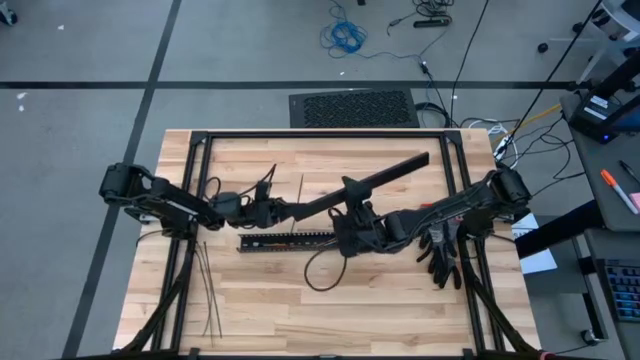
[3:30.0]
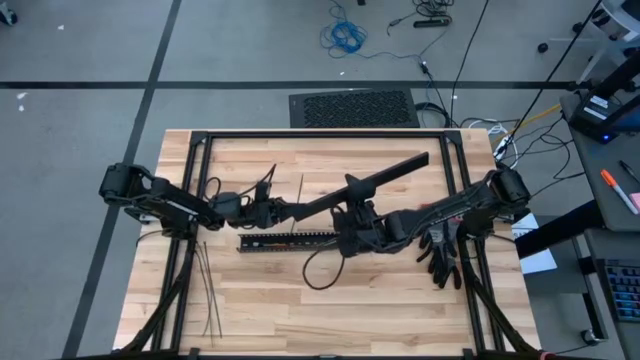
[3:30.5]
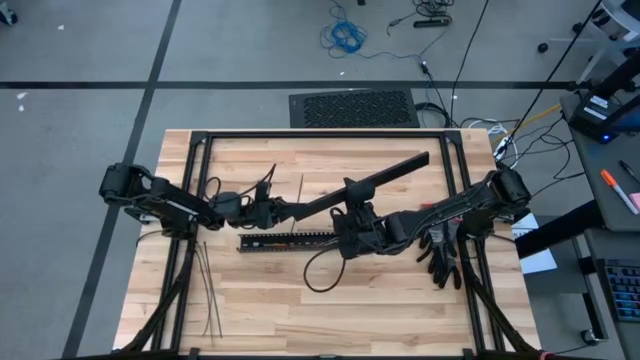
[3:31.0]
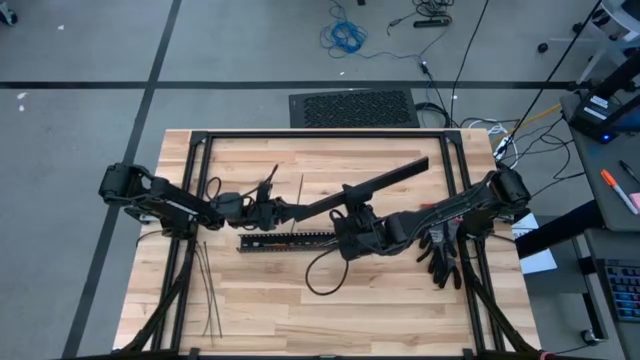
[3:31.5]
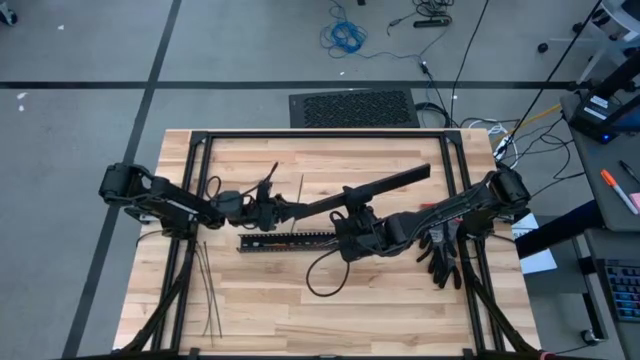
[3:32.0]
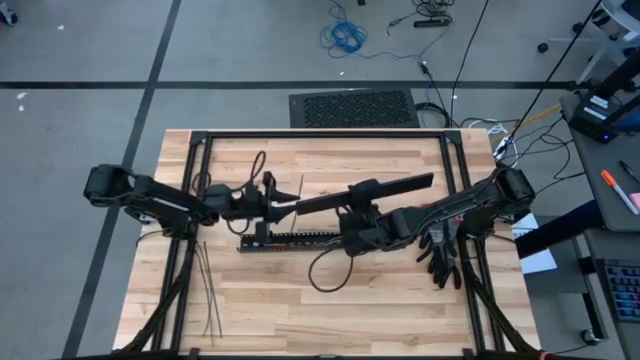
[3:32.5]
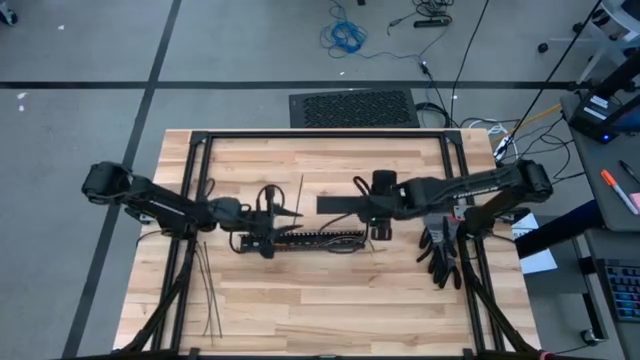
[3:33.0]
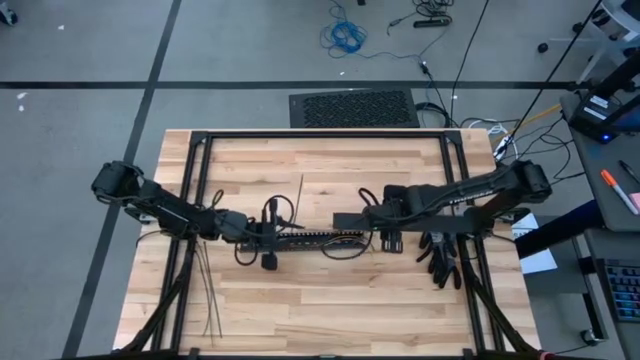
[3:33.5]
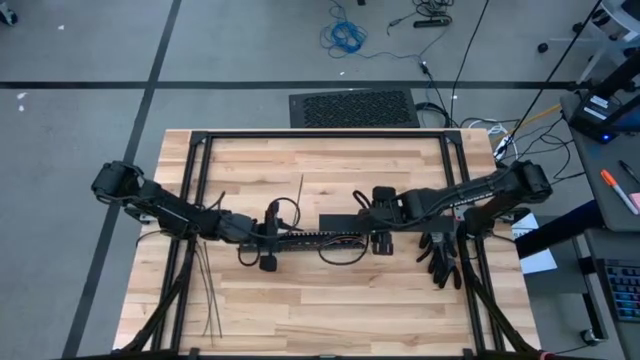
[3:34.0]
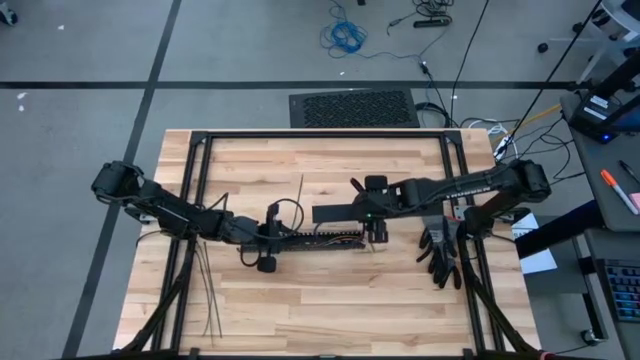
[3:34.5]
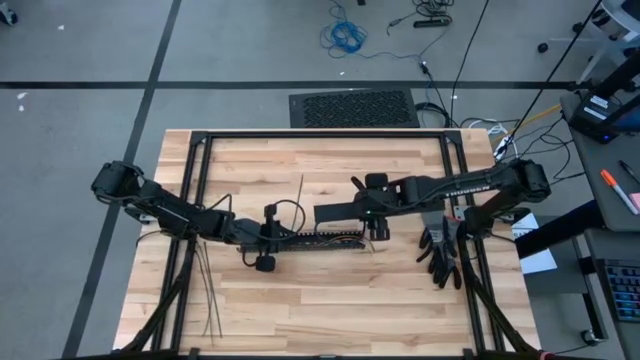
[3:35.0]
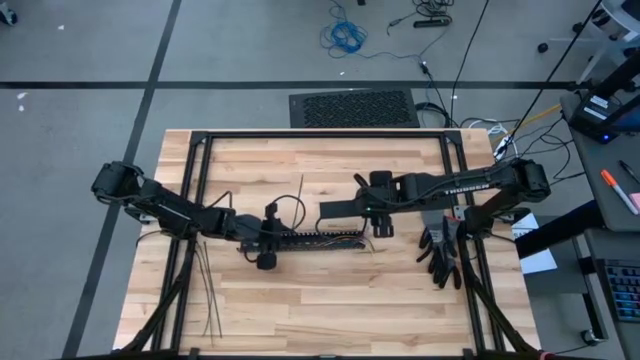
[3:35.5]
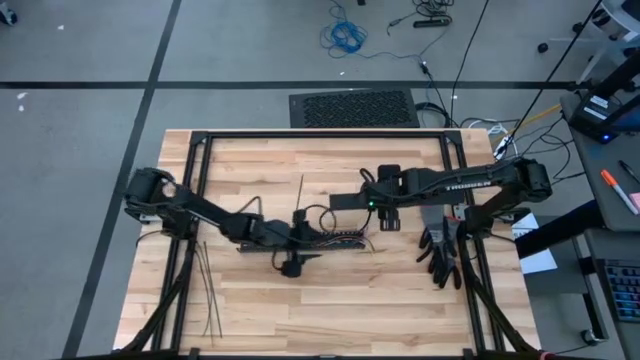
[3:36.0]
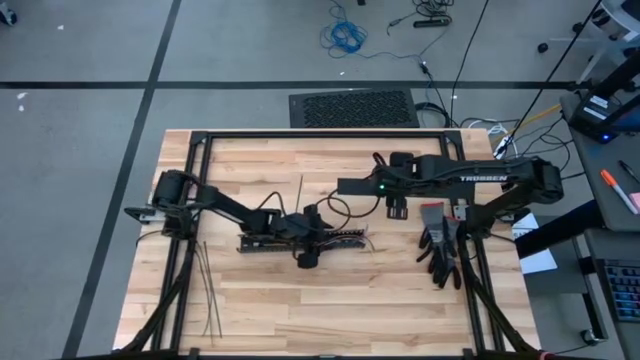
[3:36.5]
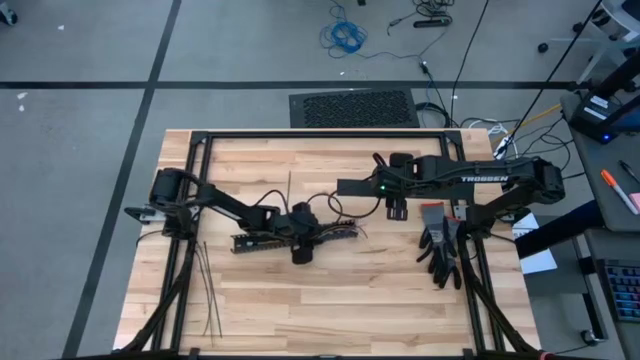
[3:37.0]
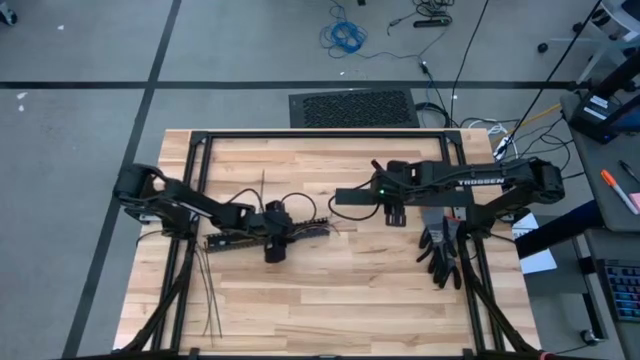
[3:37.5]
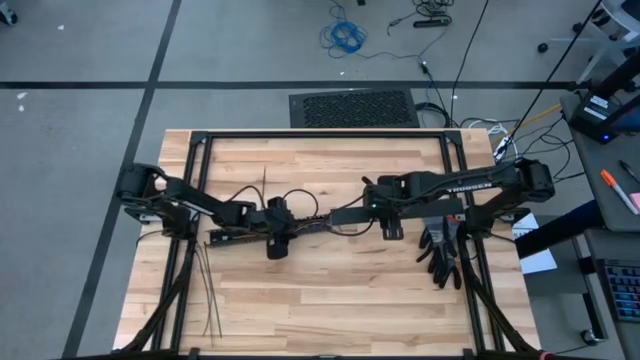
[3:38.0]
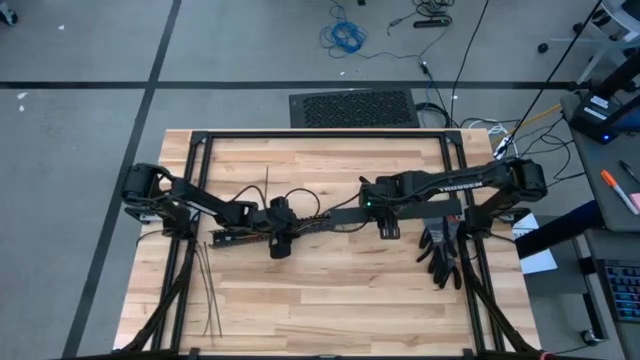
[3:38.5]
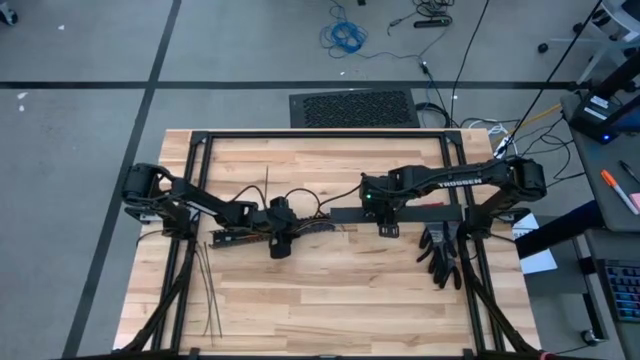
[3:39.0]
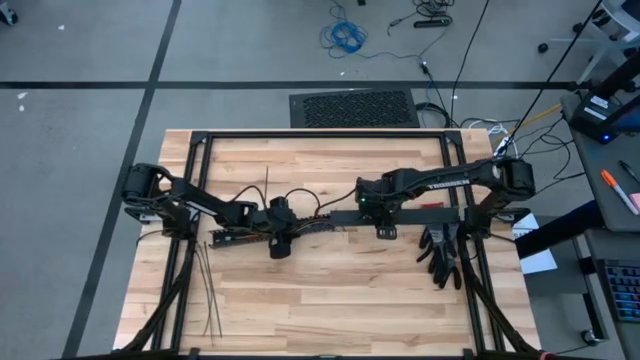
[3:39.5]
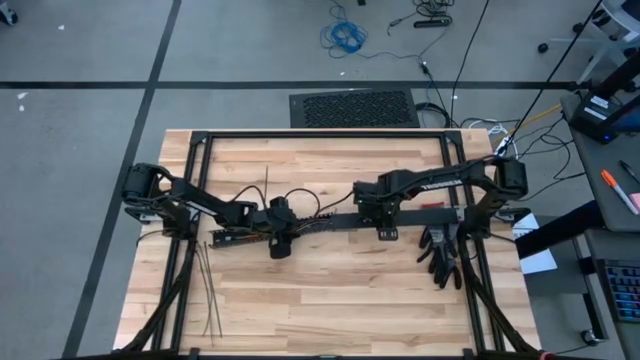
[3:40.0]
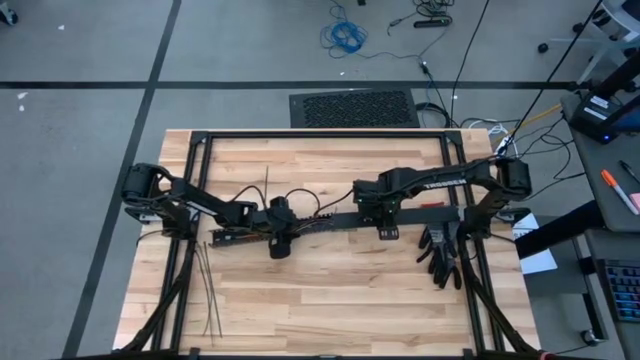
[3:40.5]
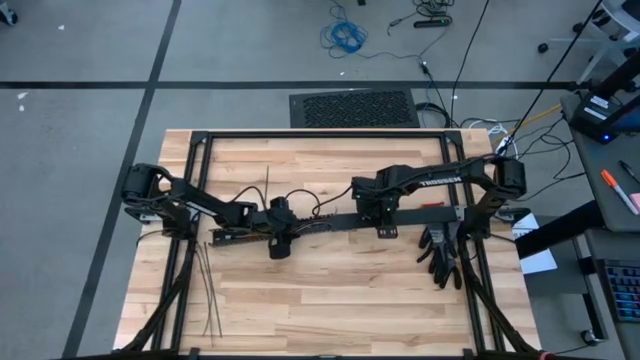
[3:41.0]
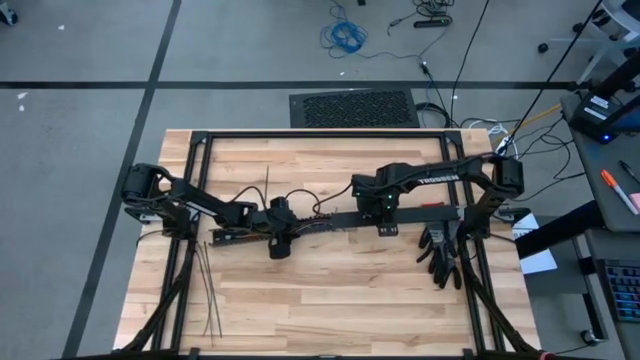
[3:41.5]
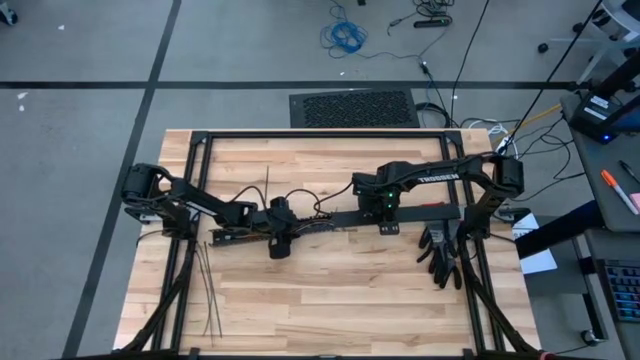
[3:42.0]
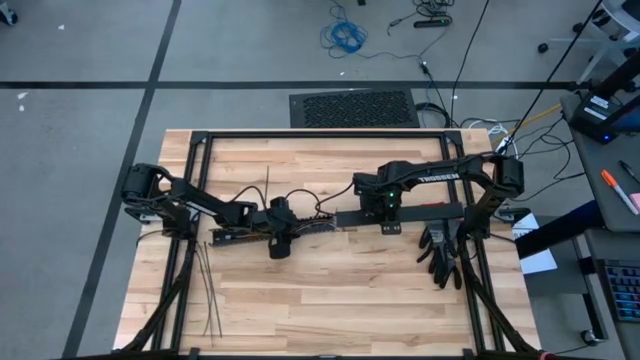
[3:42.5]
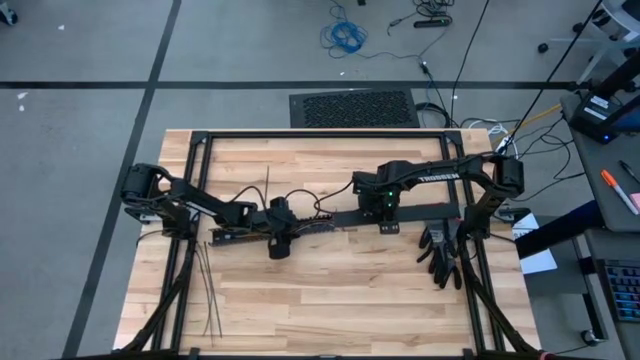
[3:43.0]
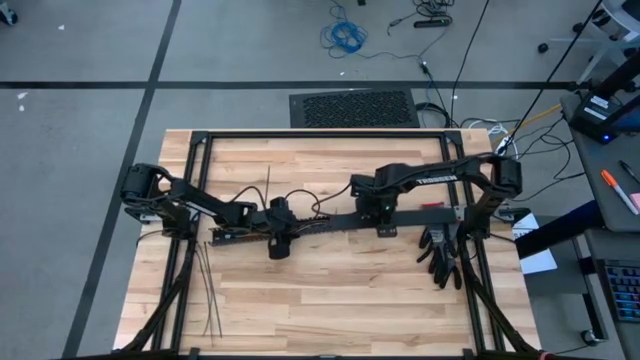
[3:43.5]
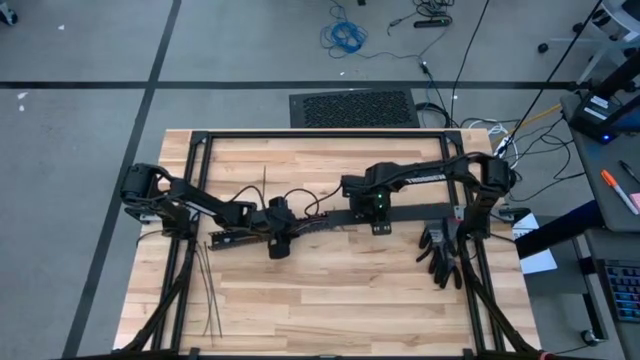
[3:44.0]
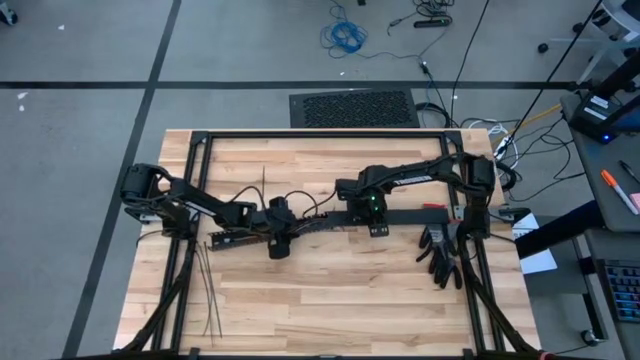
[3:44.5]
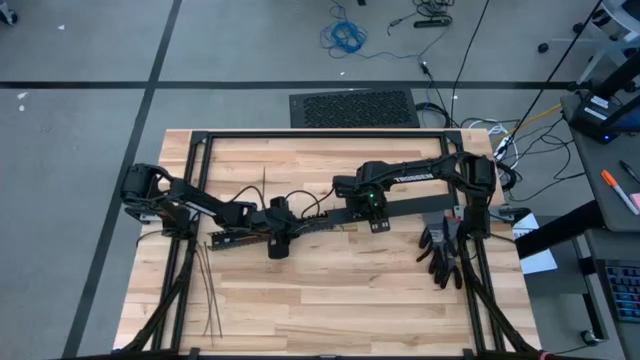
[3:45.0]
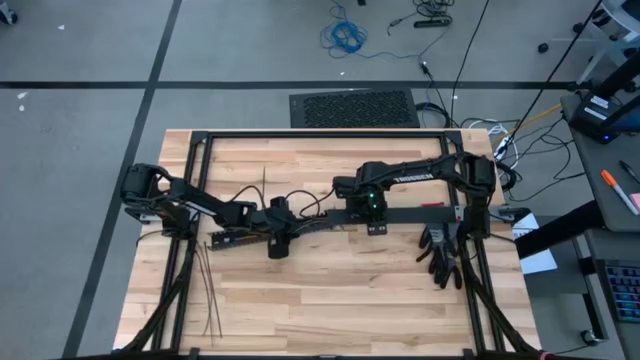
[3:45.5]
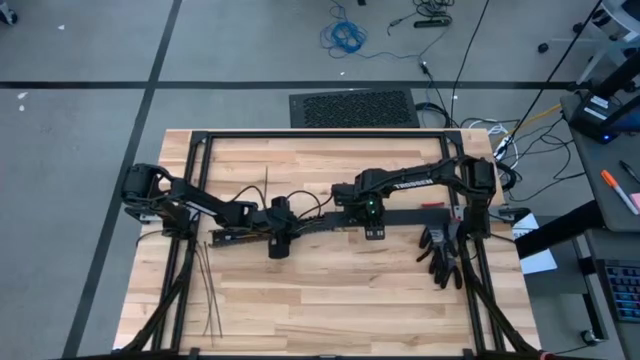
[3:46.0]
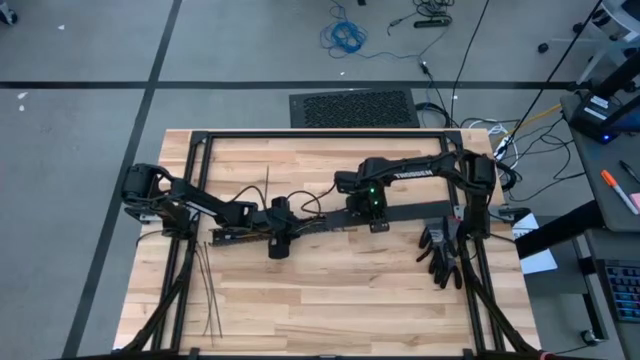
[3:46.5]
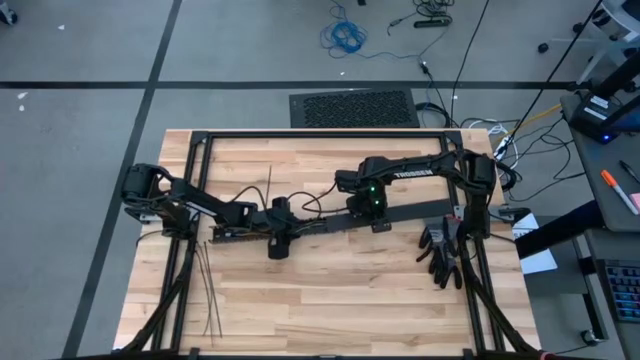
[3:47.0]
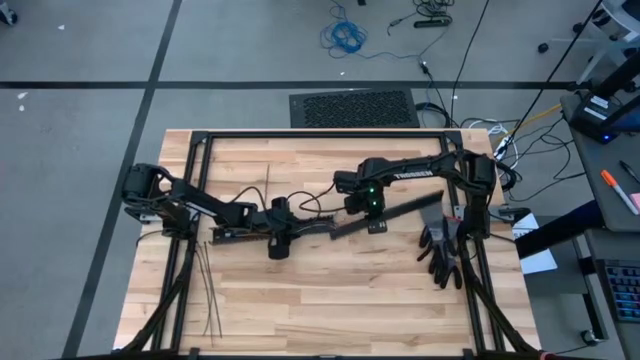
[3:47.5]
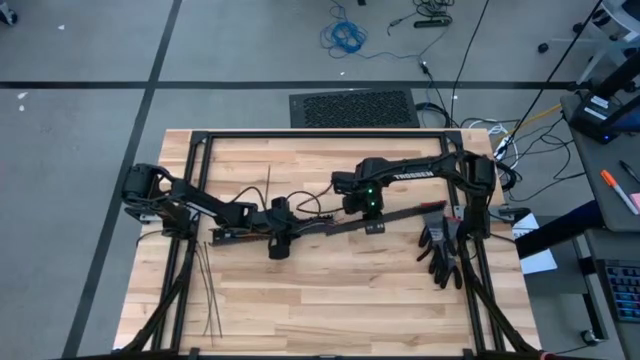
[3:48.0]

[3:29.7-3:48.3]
Task: Ziptie cables
Close the black cable duct

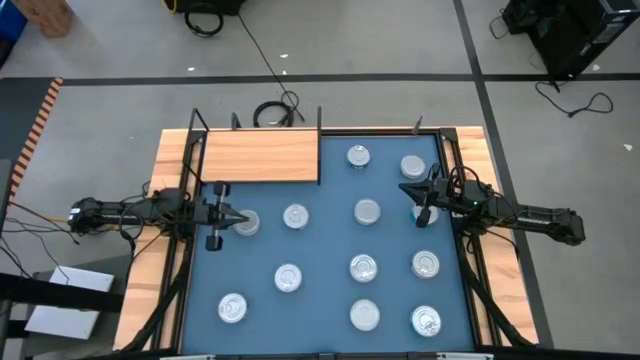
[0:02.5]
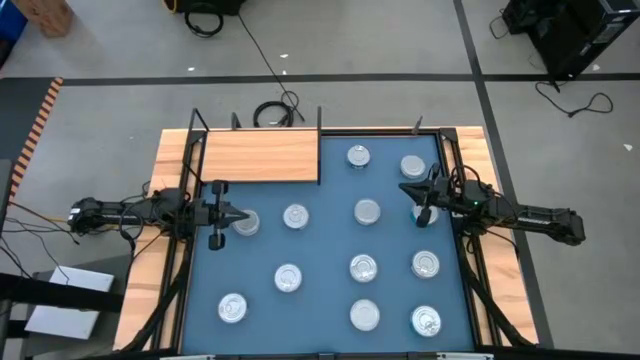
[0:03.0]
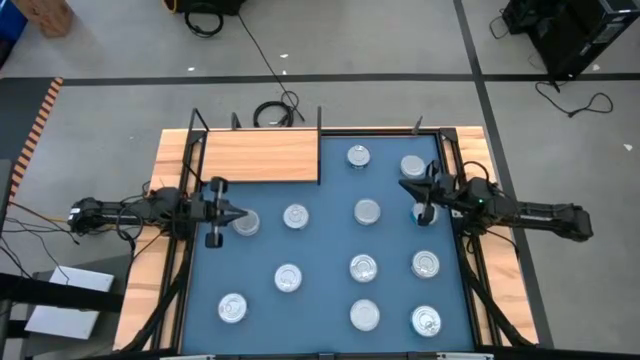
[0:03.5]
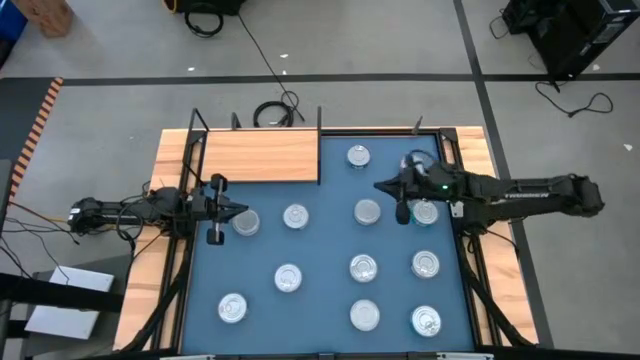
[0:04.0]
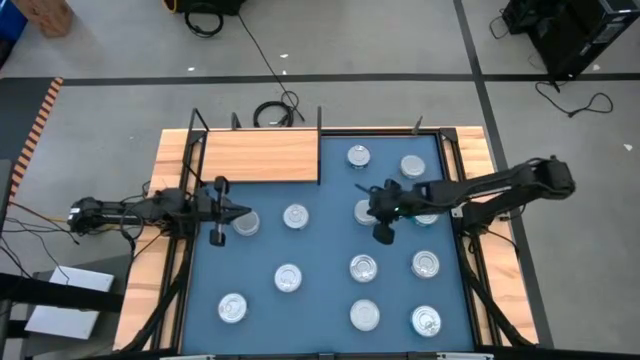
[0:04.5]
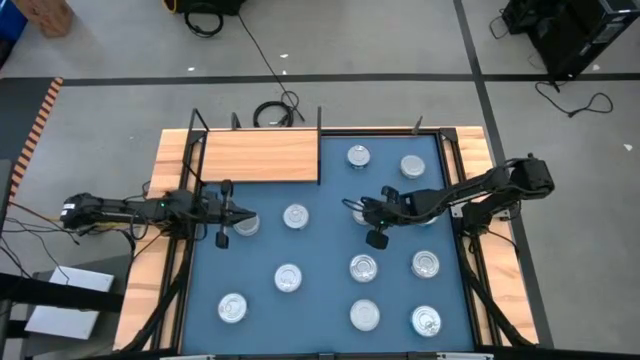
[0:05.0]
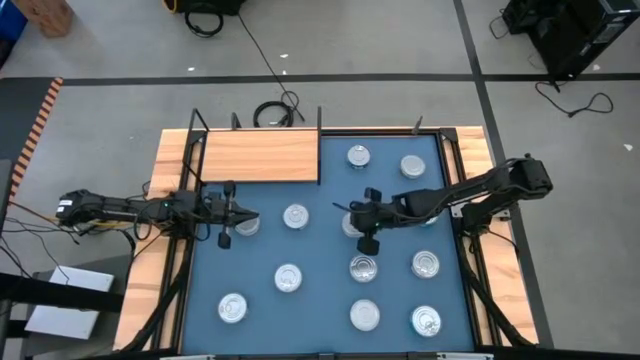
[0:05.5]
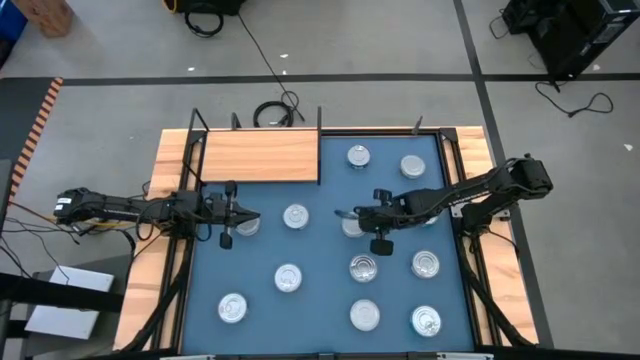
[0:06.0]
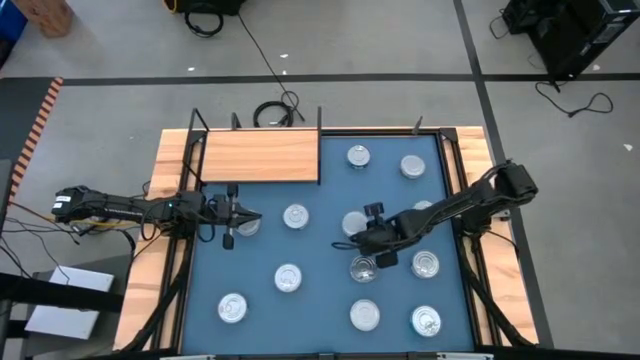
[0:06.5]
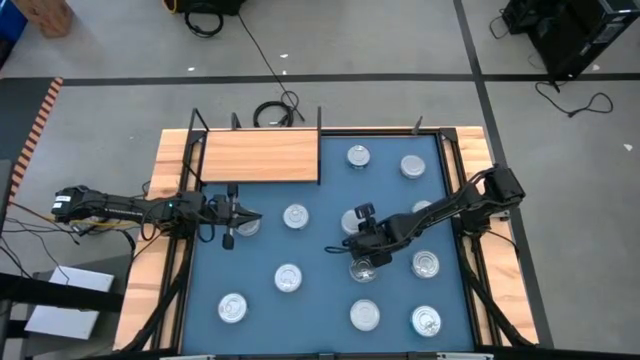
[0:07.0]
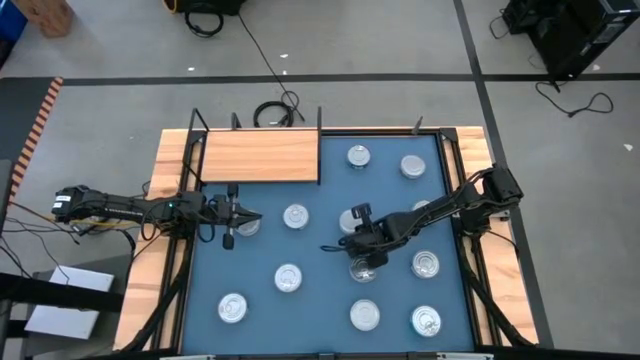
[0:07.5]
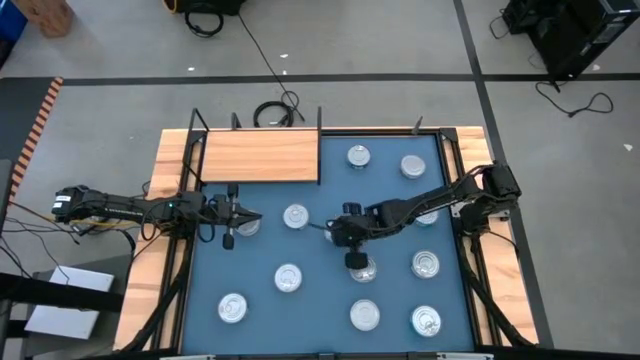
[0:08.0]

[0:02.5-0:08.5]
Task: Stack canned seafood by type on shelf
Put the green tuna can on the shelf
